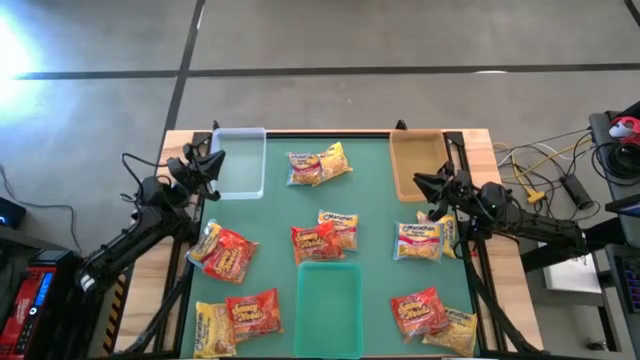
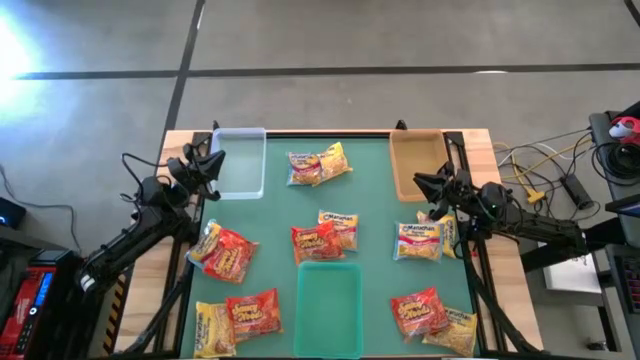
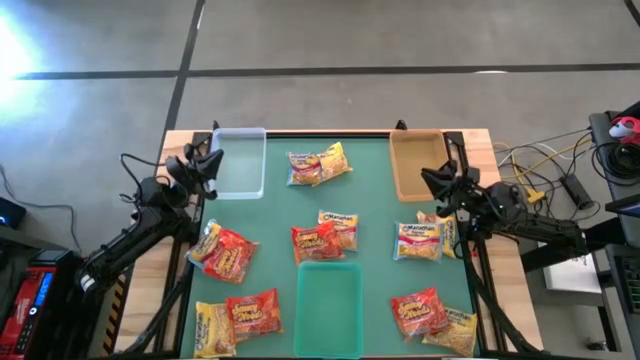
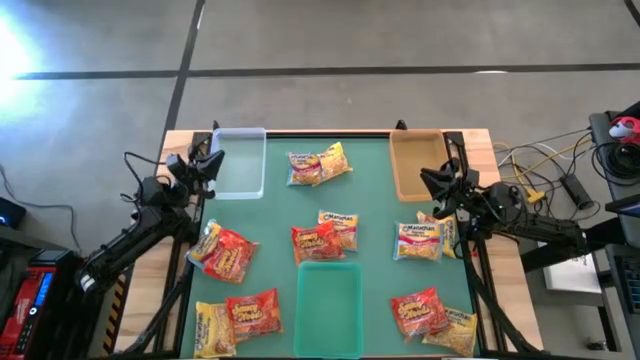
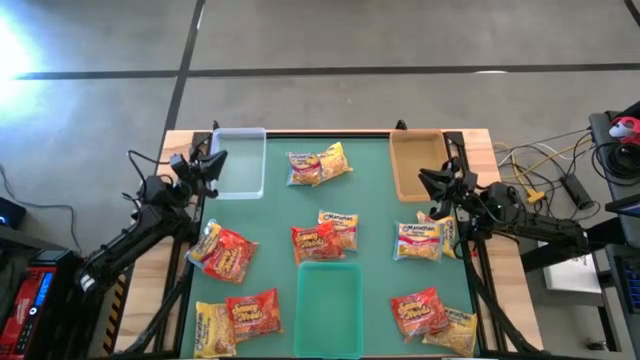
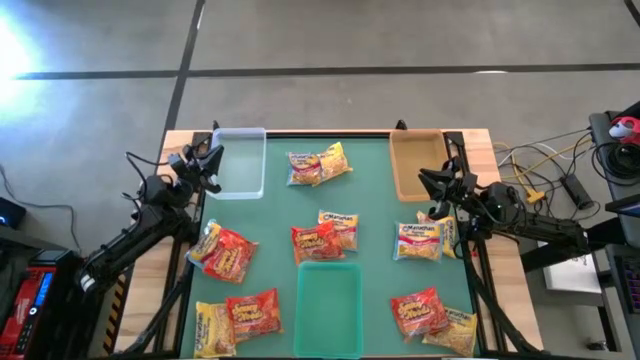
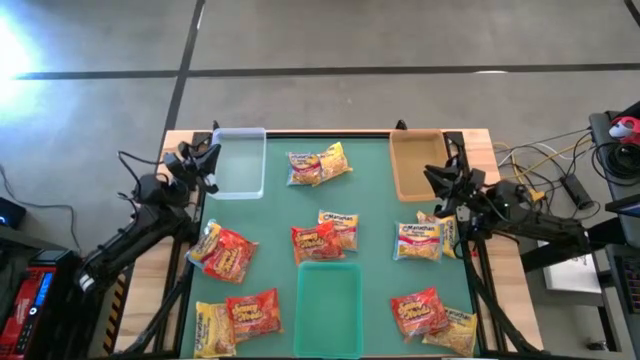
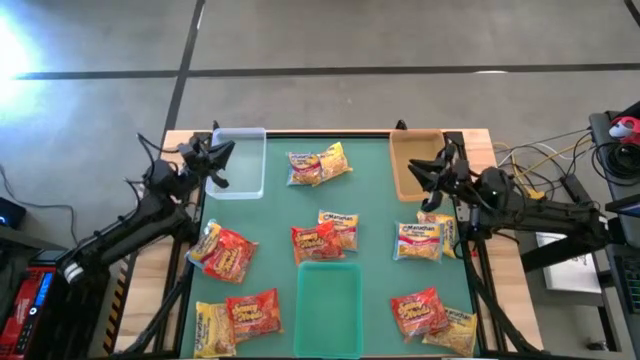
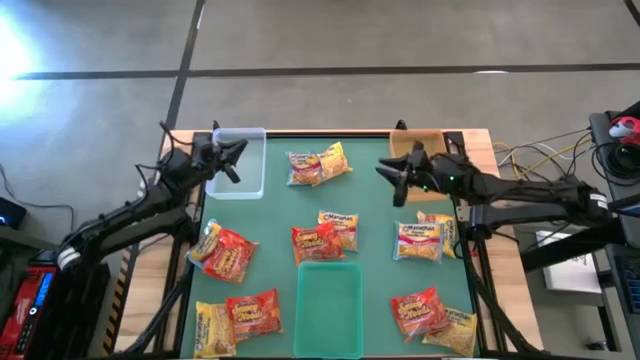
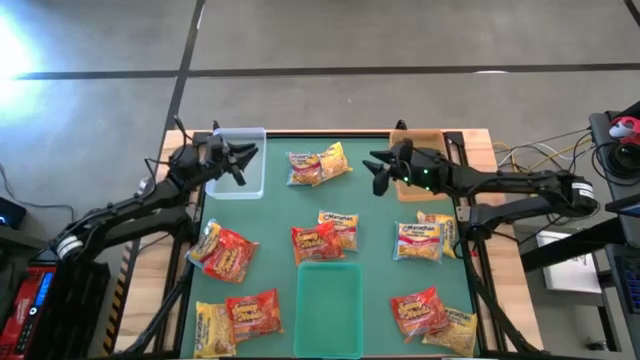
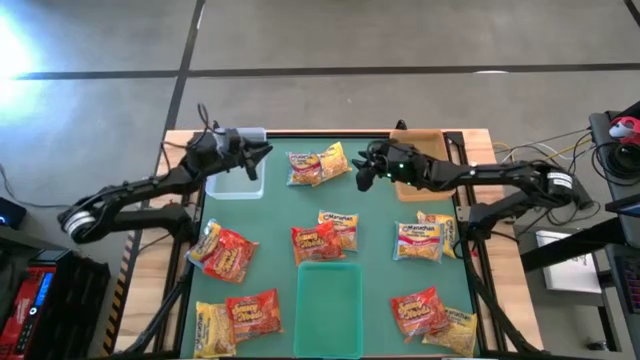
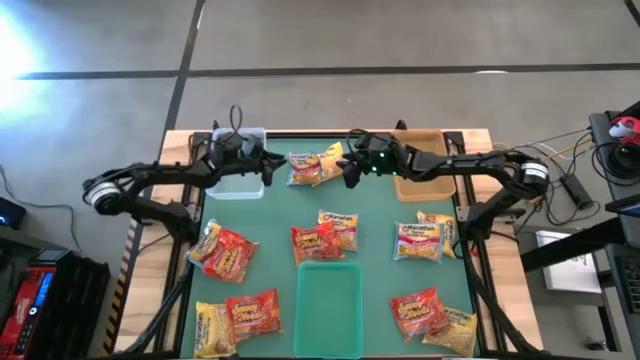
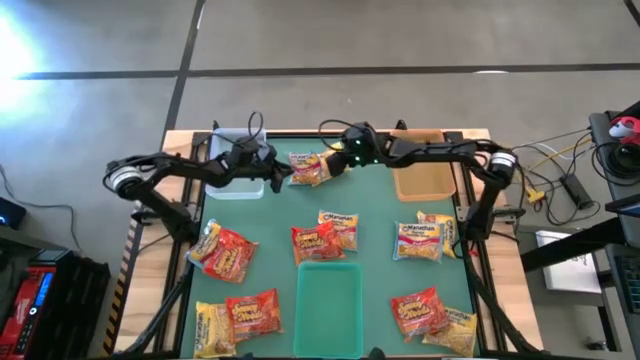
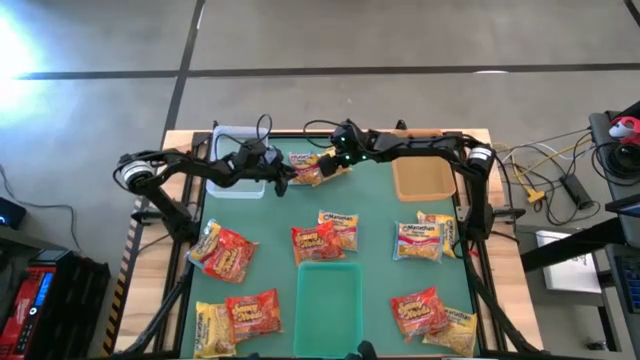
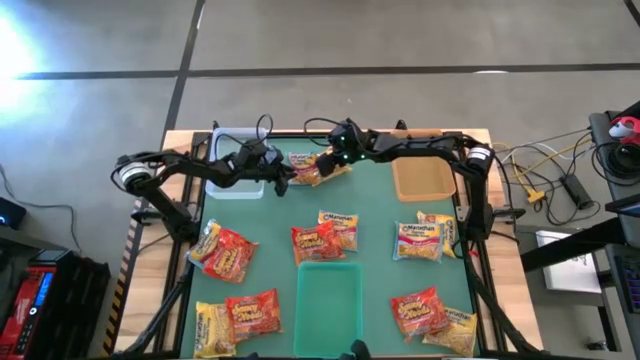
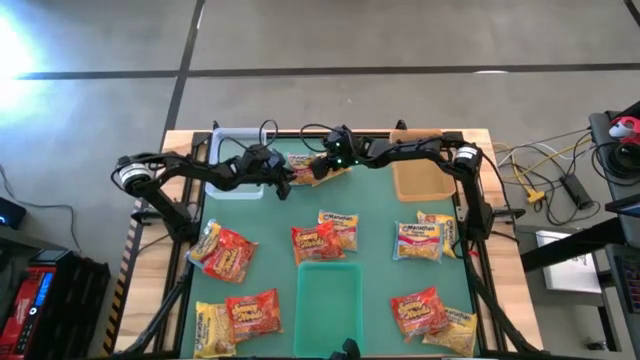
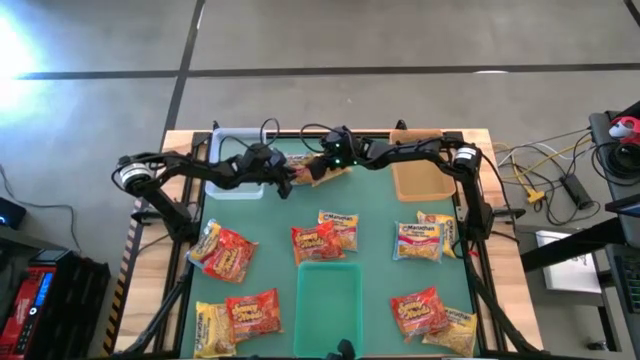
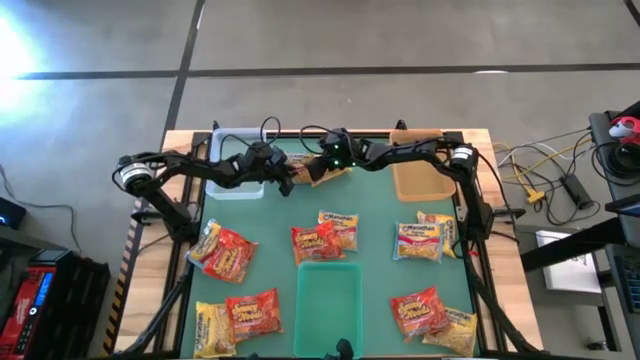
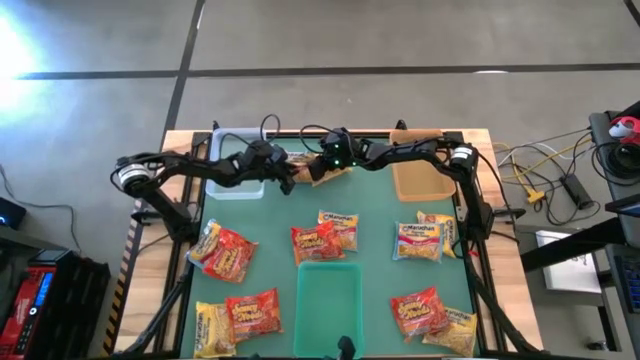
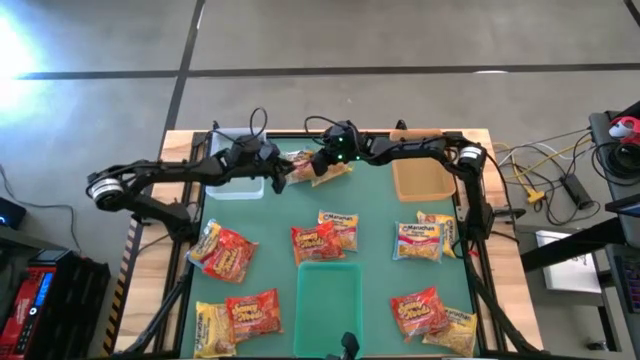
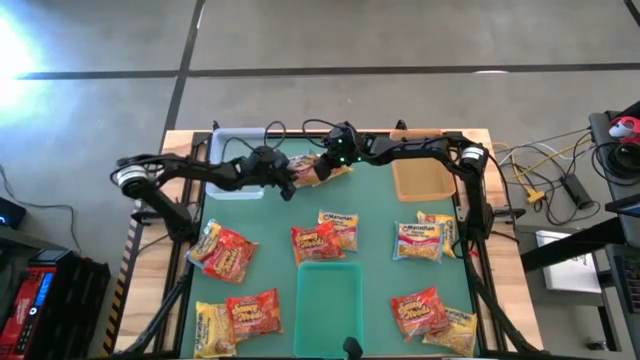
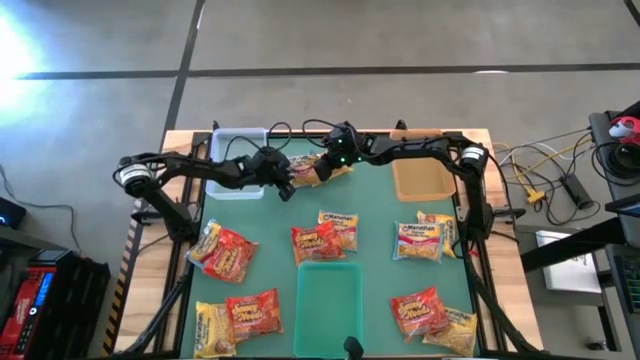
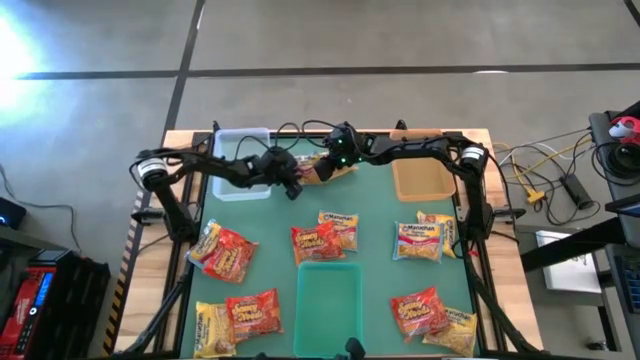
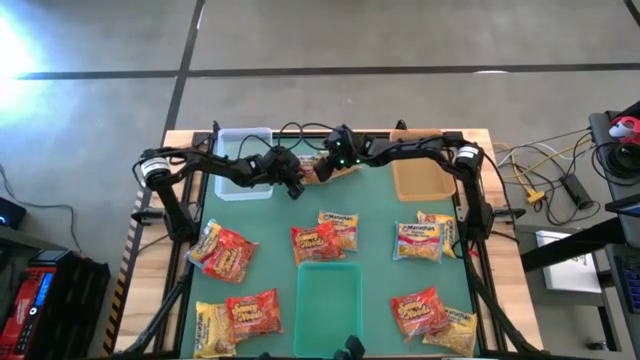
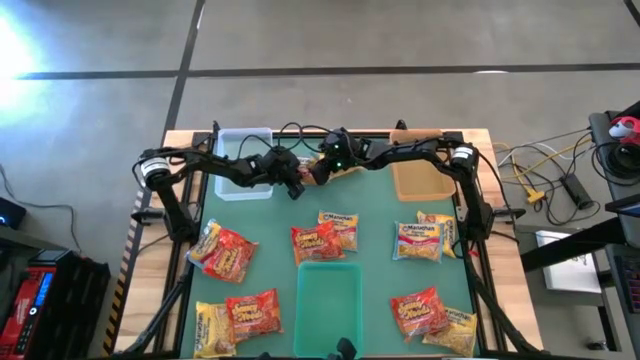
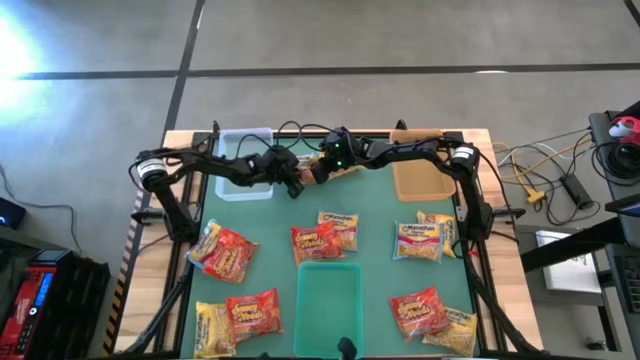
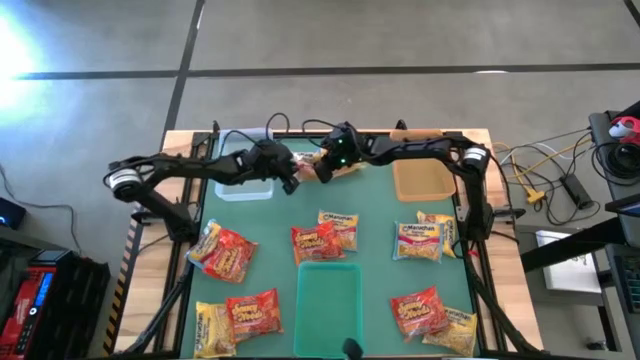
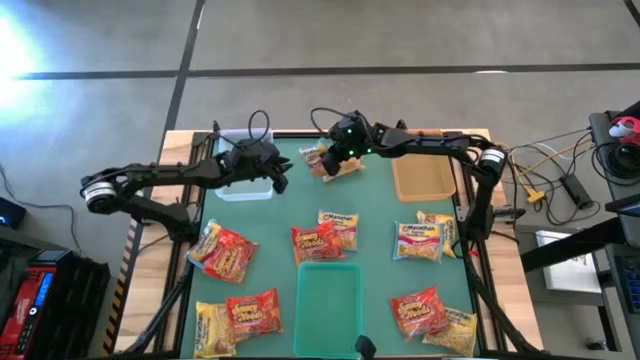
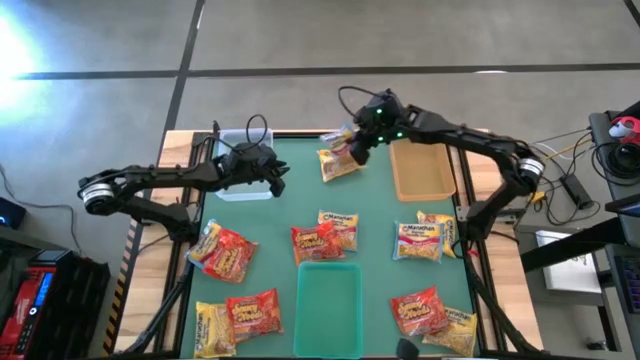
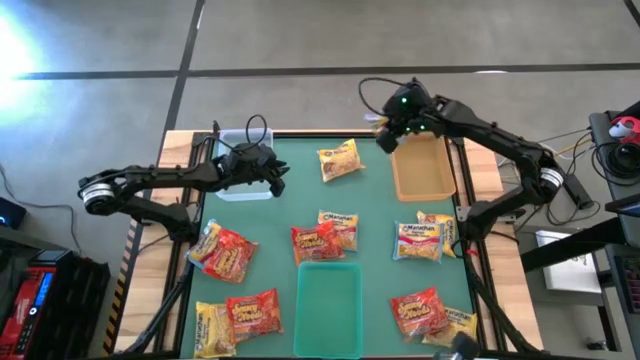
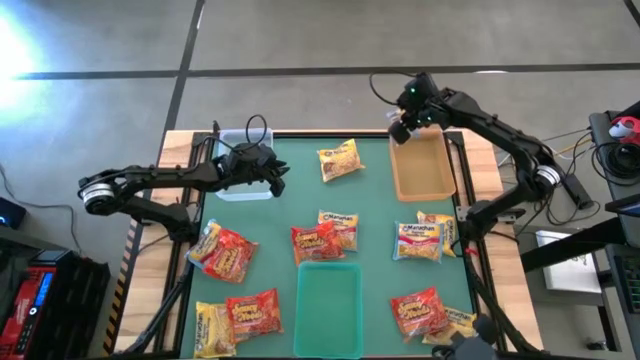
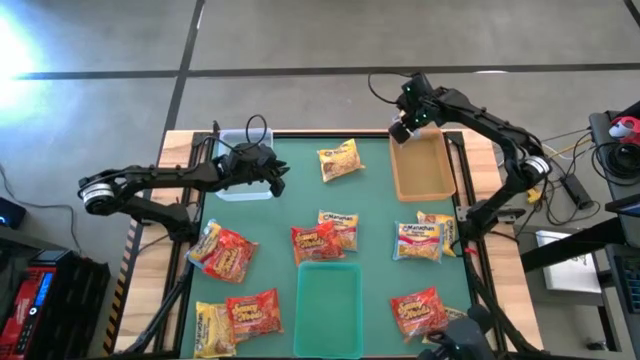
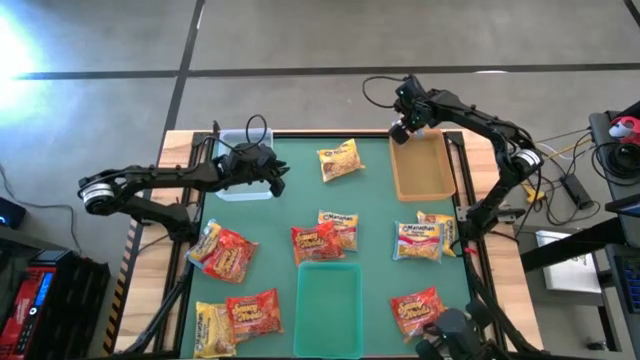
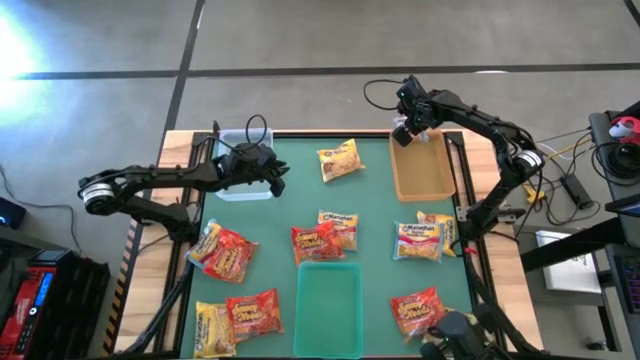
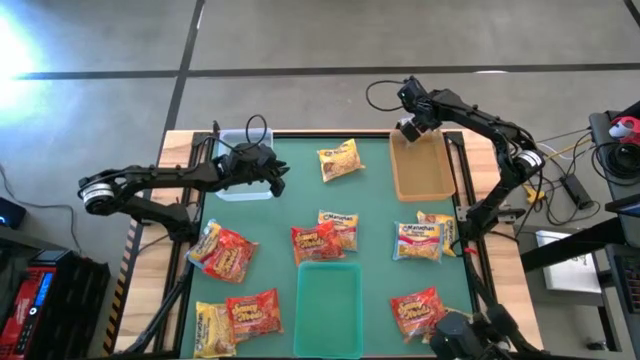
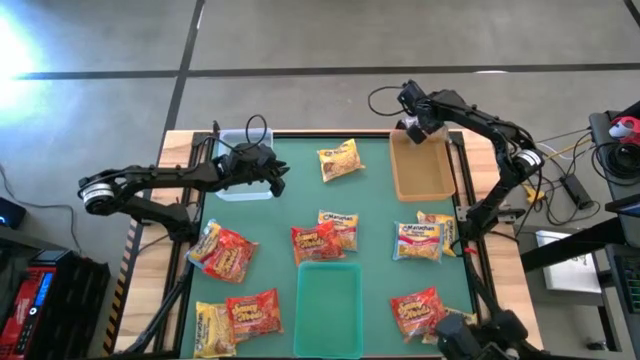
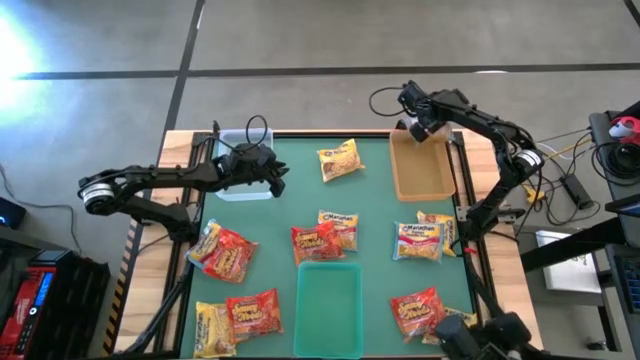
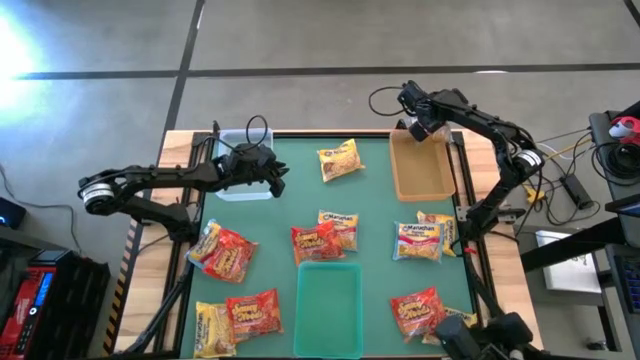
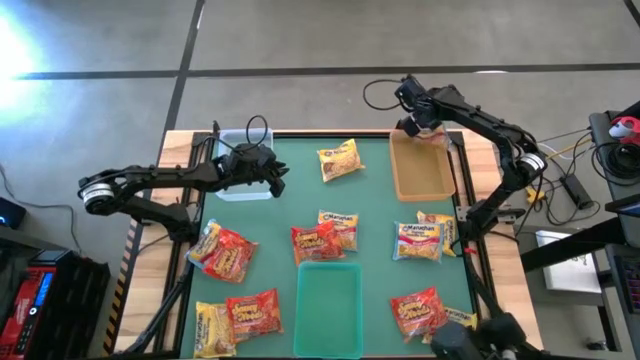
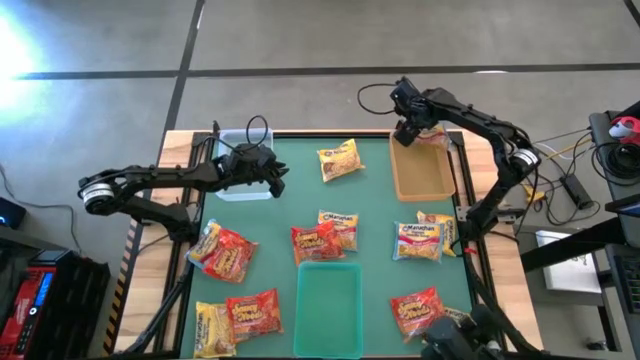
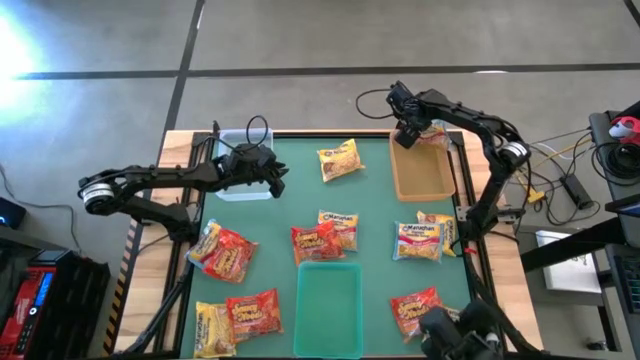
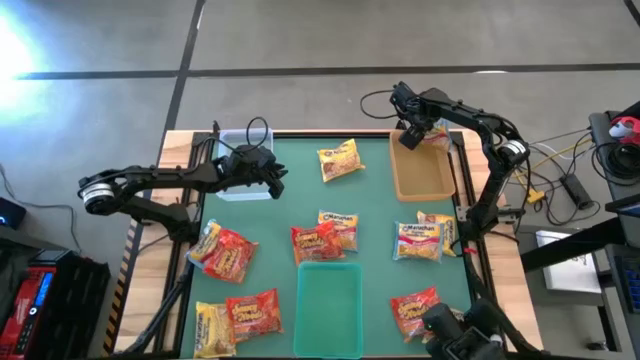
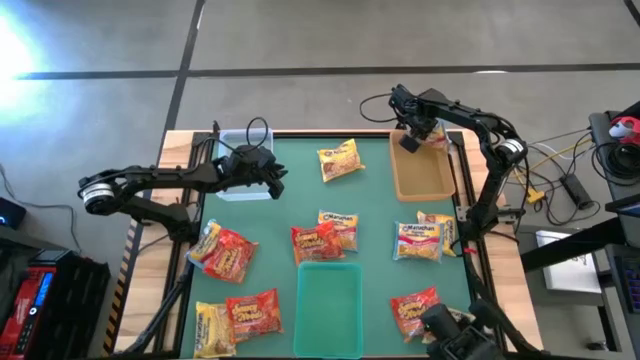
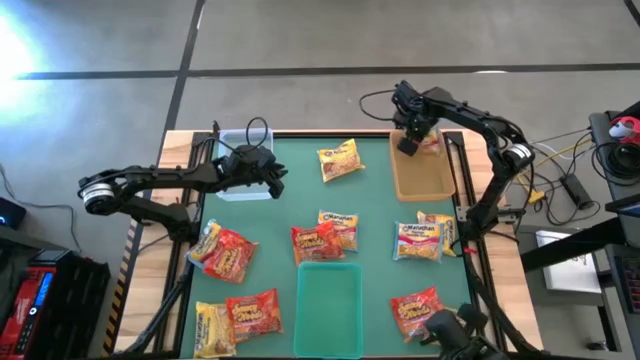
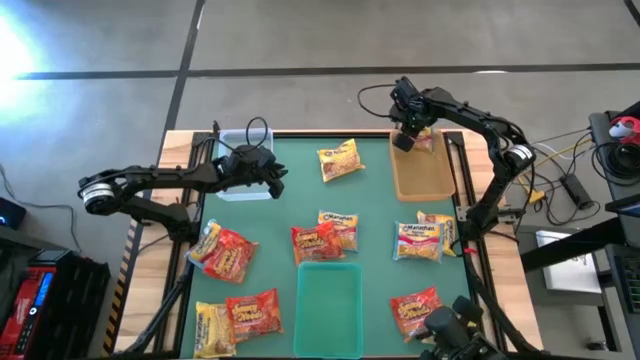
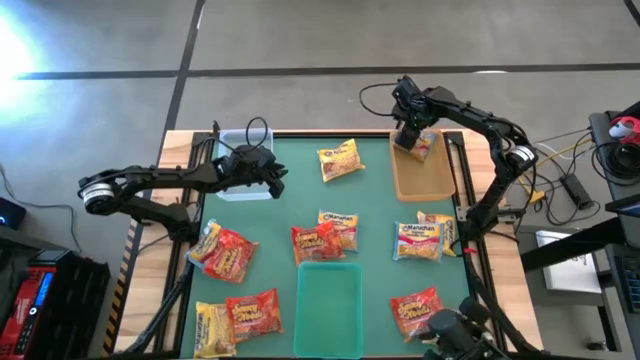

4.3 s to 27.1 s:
Task: Sort Maruchan noodles
Put the blue noodle pack into the yellow bin
